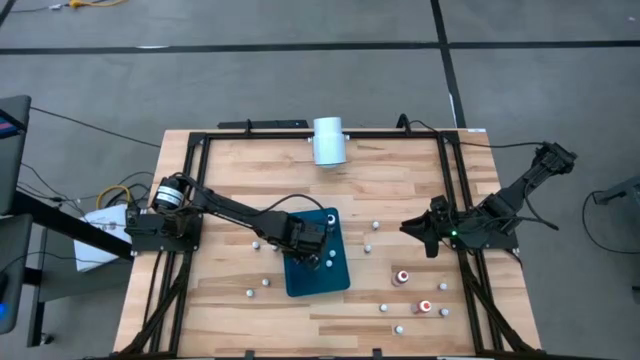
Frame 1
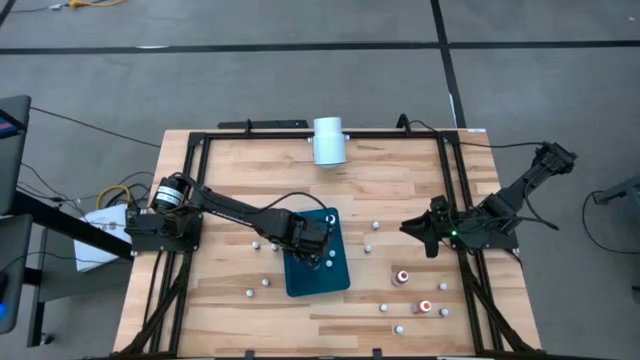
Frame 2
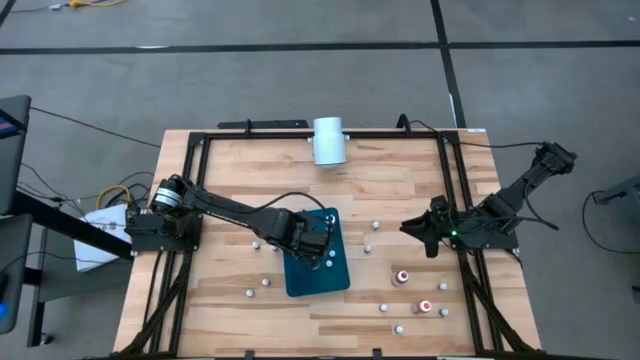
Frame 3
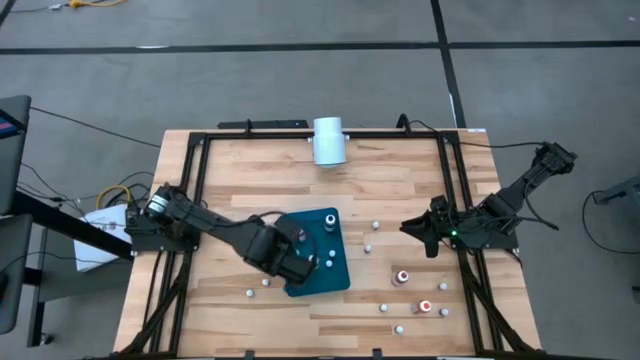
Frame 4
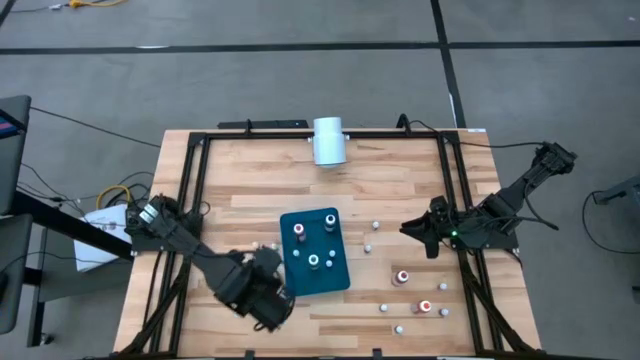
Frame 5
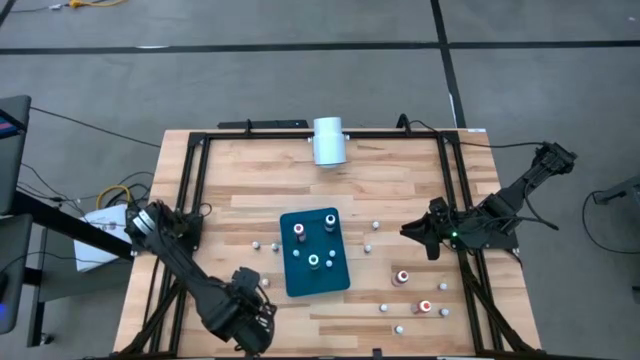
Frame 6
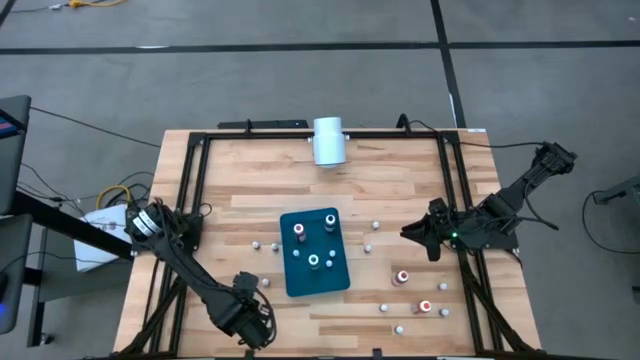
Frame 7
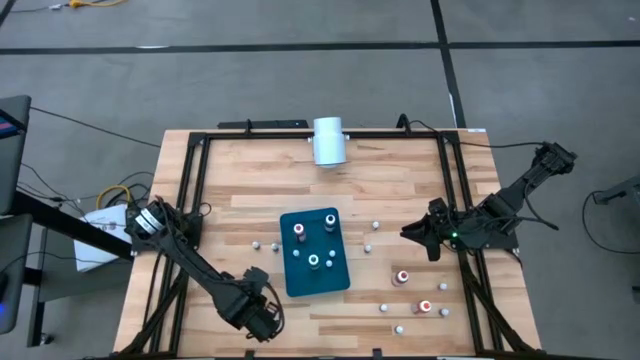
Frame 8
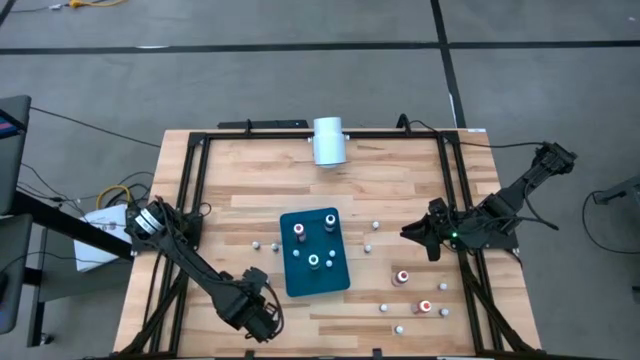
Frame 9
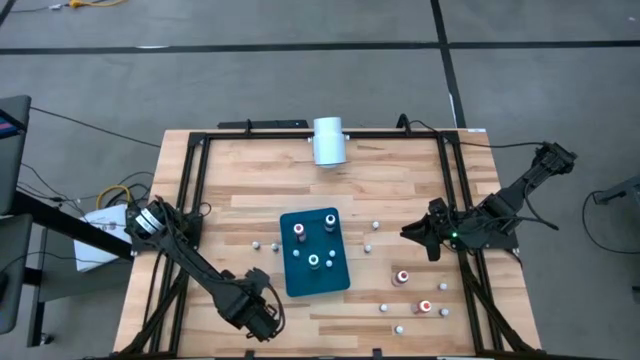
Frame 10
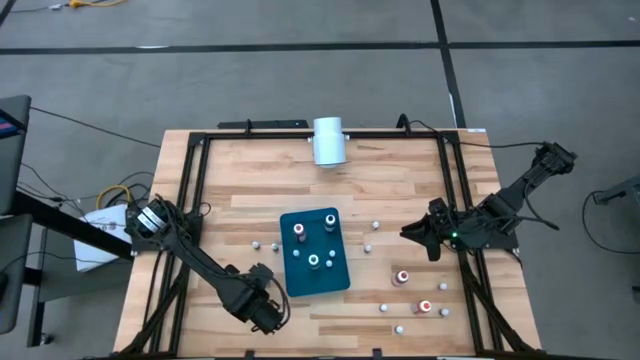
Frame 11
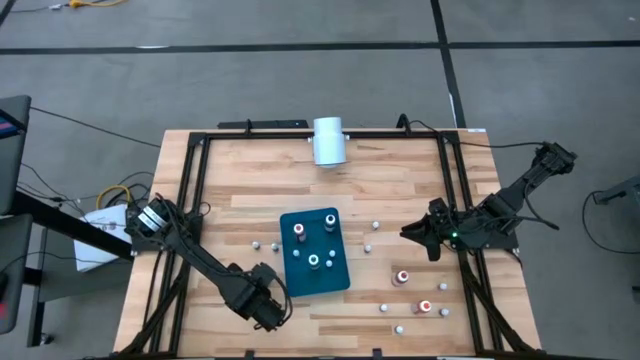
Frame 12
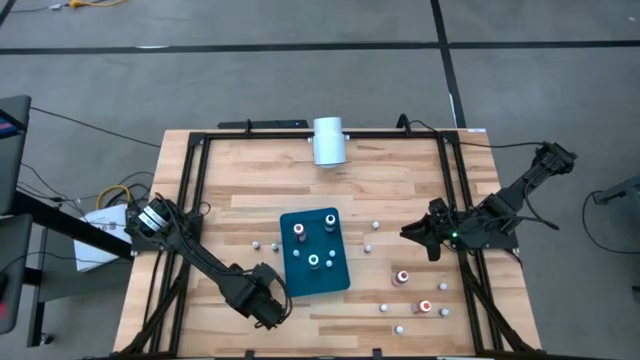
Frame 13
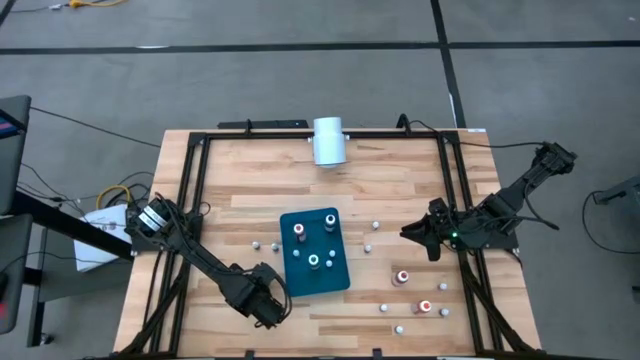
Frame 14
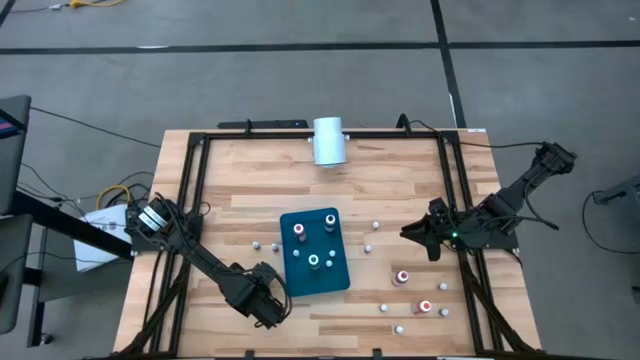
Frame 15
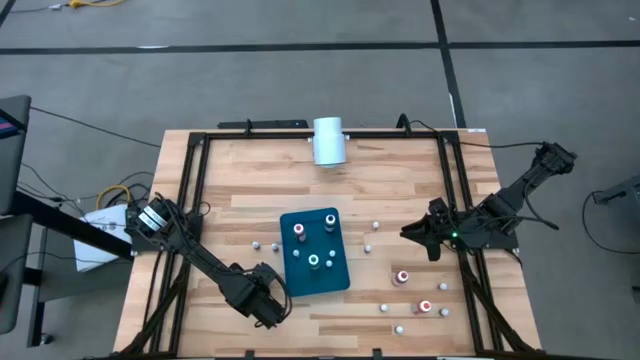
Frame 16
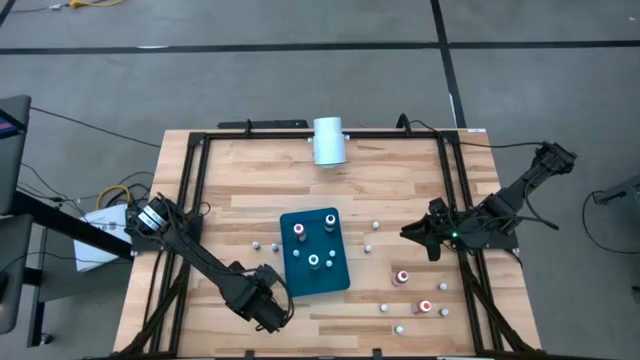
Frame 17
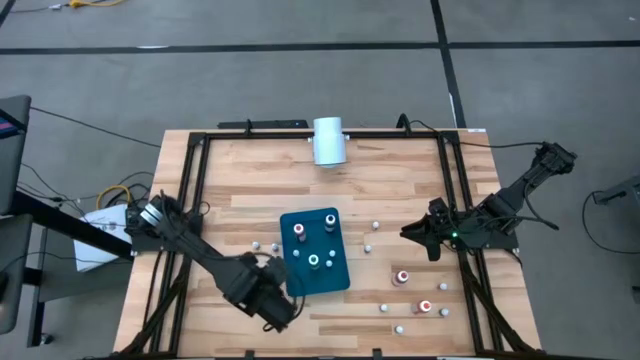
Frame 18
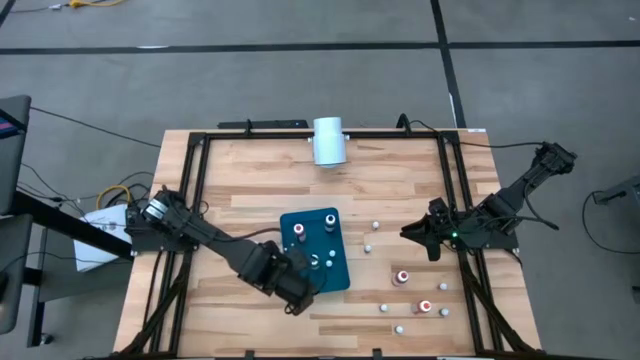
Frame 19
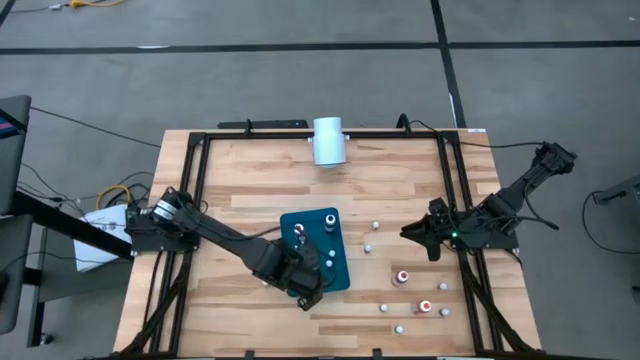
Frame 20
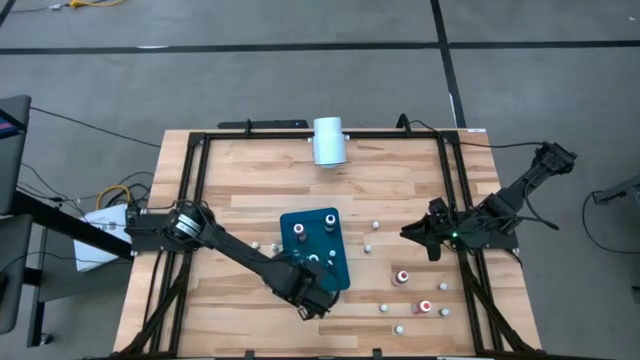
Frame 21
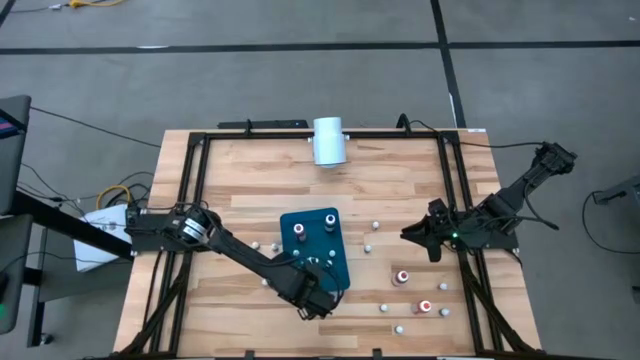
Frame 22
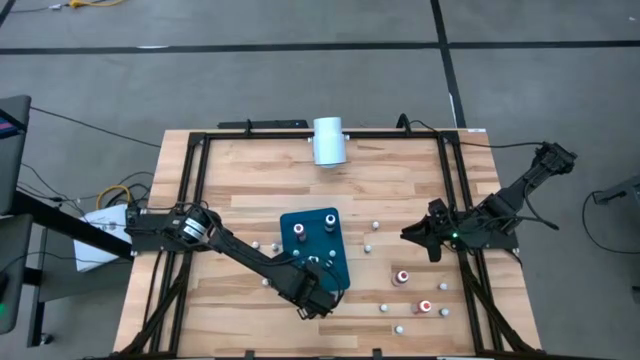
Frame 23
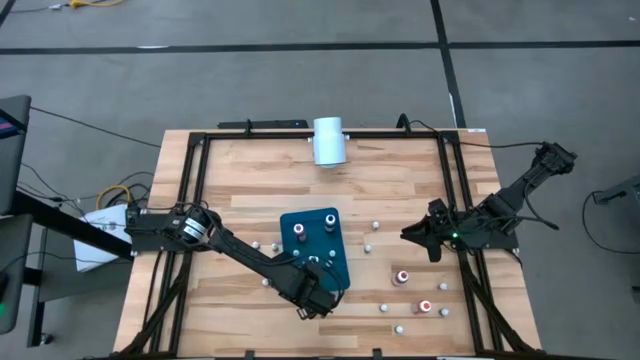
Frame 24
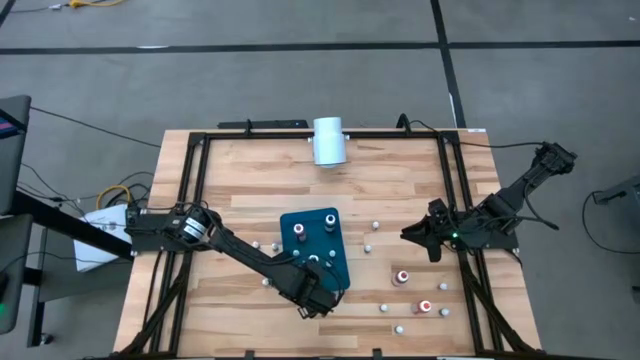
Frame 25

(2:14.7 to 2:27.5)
Task: Pick & Place food coloring
Put the bottom left small green food coloring bottle into the blue bin

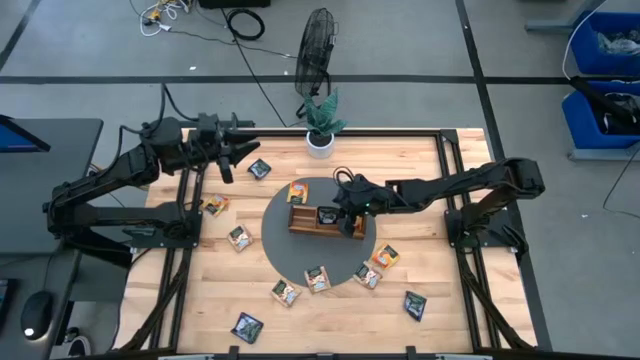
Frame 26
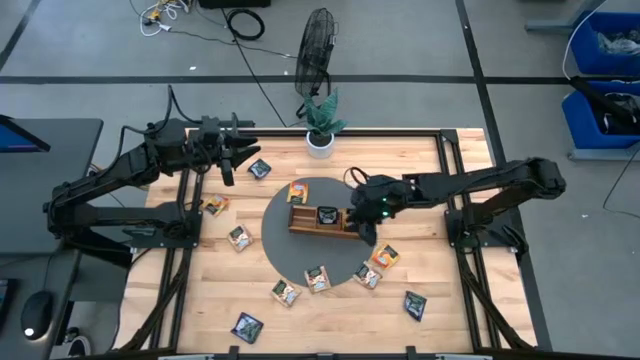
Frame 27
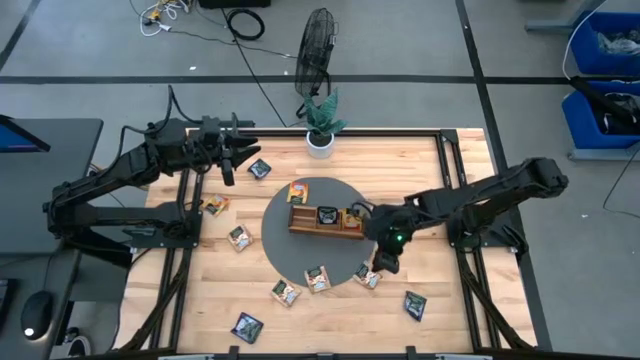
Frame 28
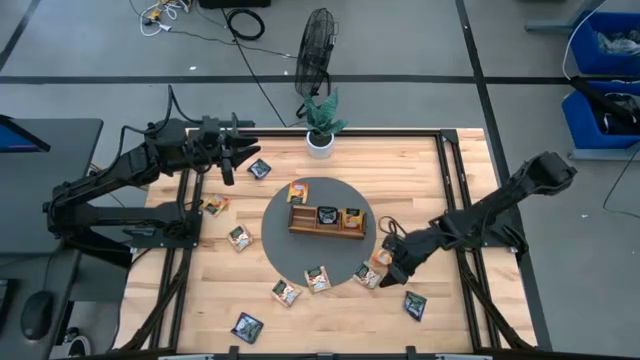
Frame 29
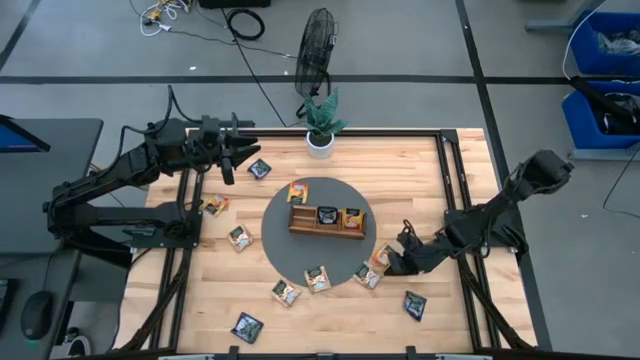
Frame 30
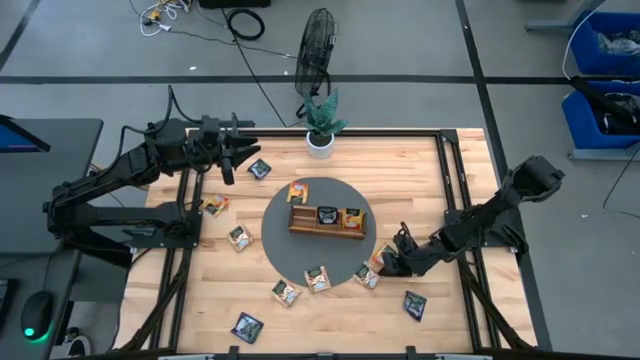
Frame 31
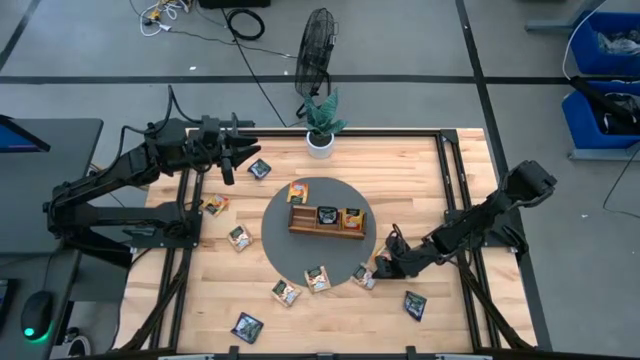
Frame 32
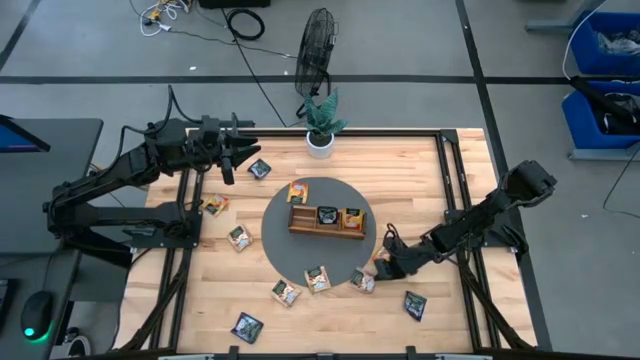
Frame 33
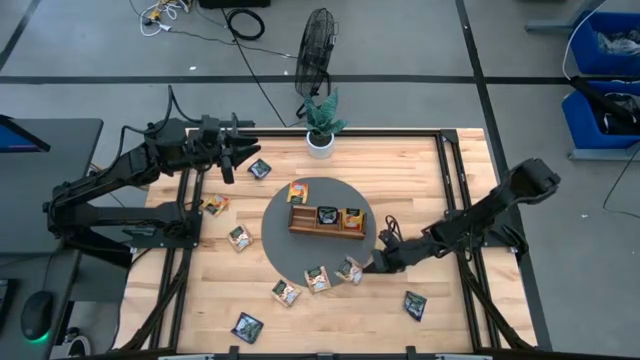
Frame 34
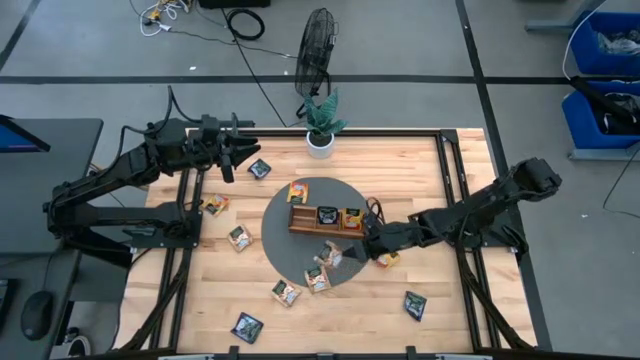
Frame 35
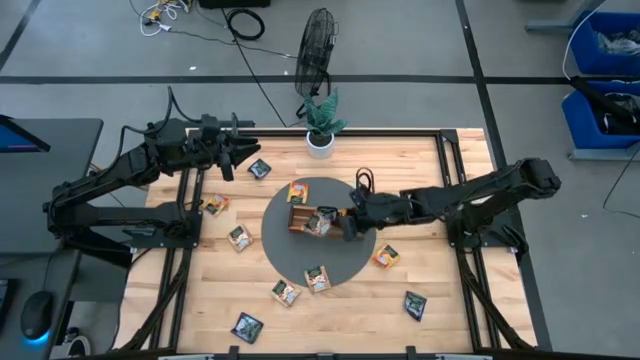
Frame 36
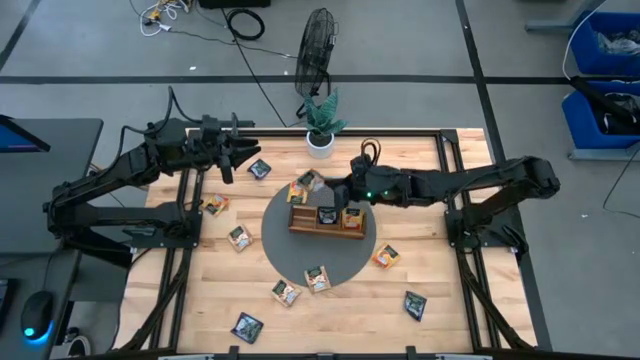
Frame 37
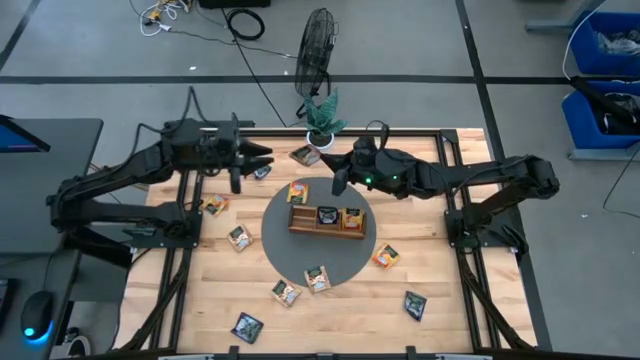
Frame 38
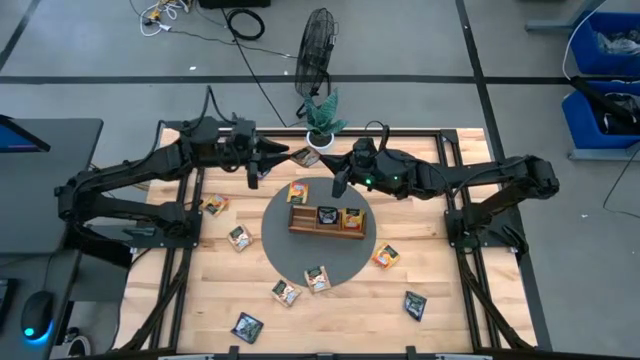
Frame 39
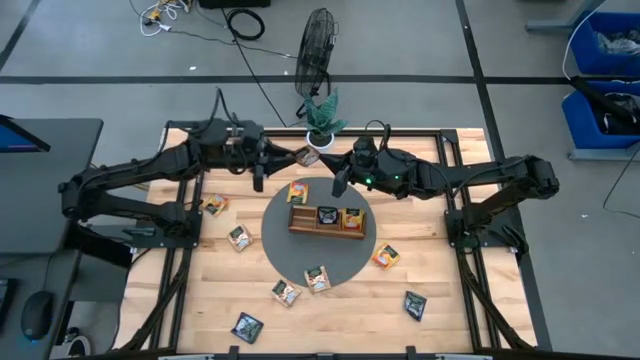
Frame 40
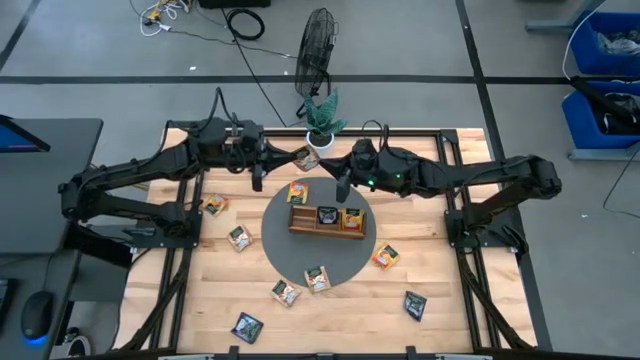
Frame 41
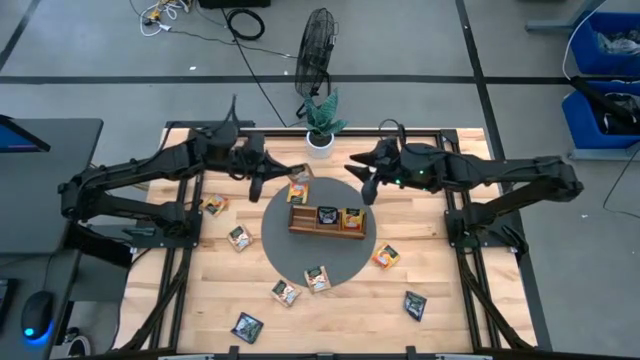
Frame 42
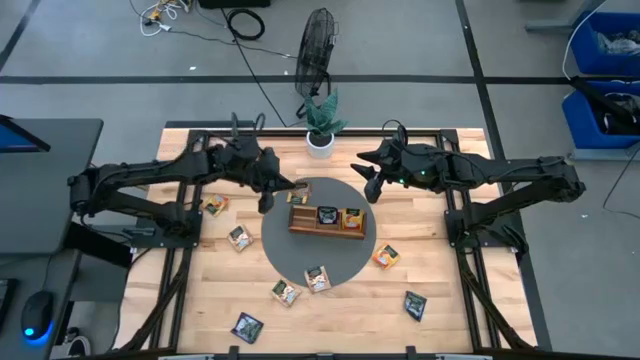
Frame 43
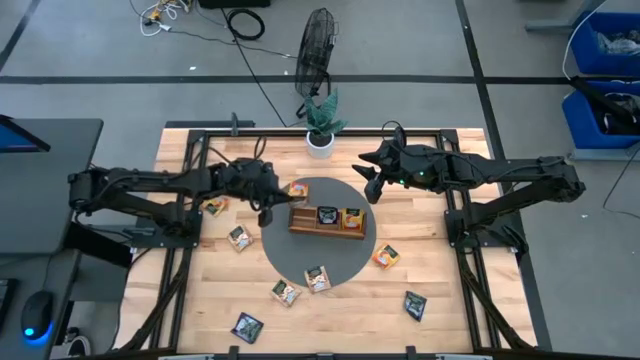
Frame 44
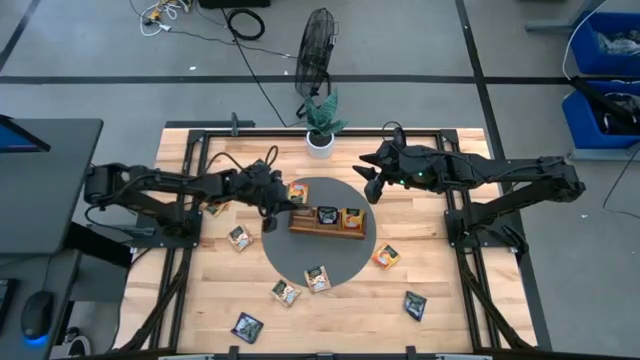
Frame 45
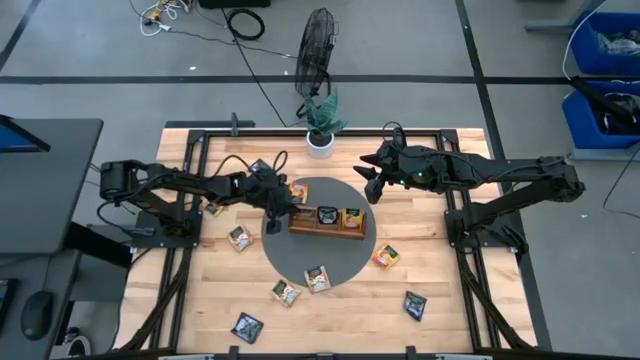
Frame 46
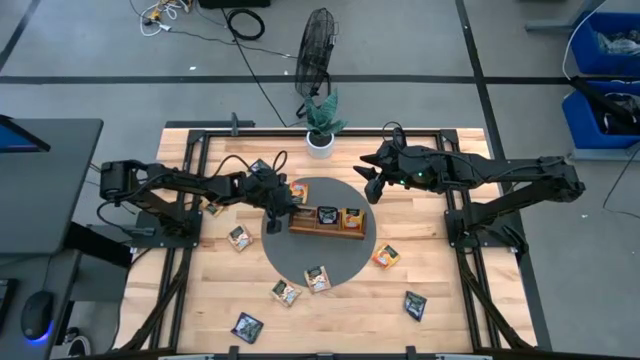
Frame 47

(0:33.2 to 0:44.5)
Task: Pick & Place Tea
Put the brown tea bag into the left section of the wooden organizer
